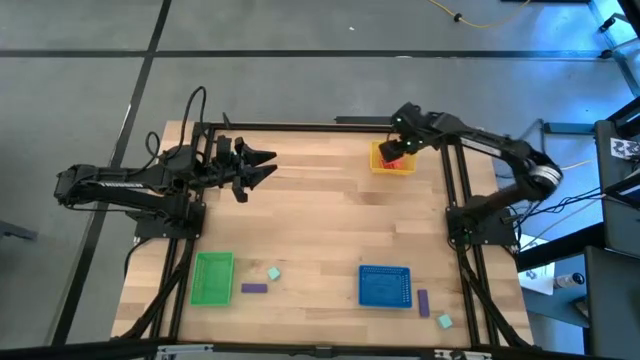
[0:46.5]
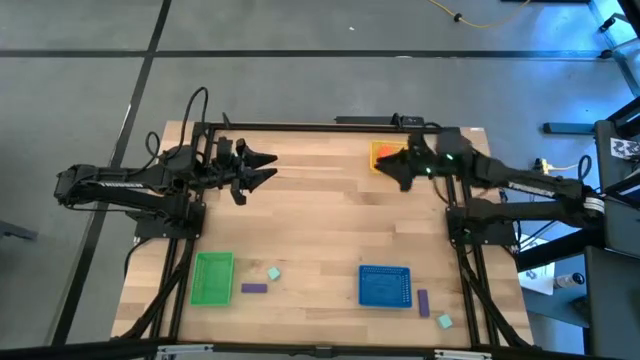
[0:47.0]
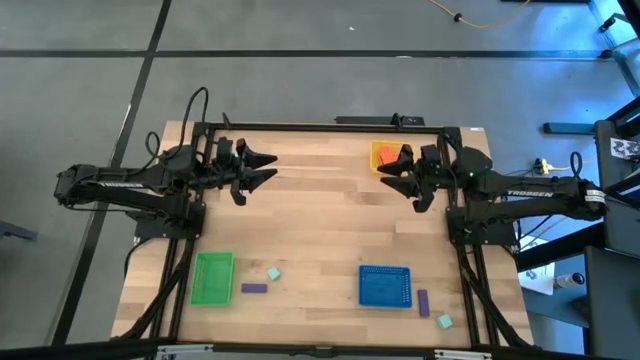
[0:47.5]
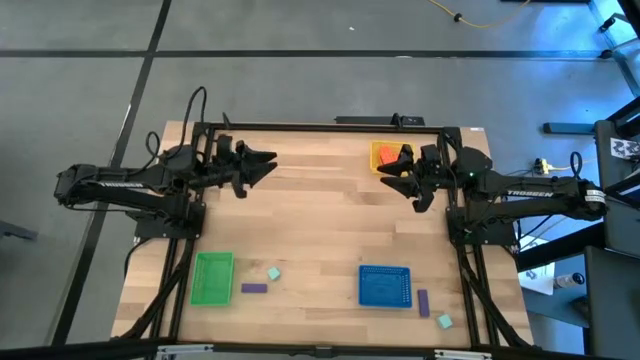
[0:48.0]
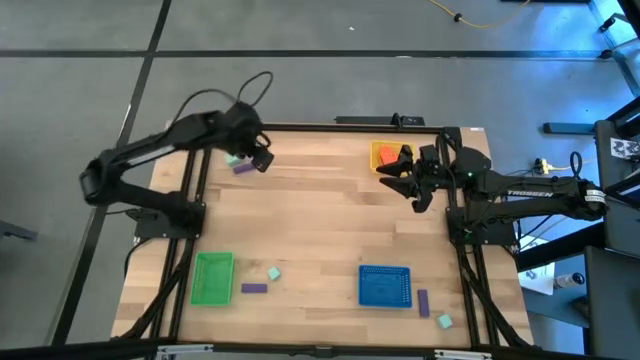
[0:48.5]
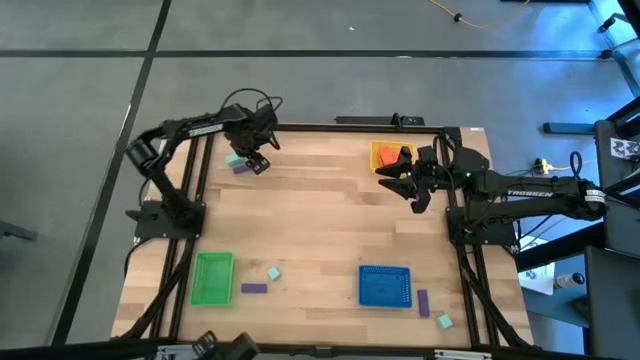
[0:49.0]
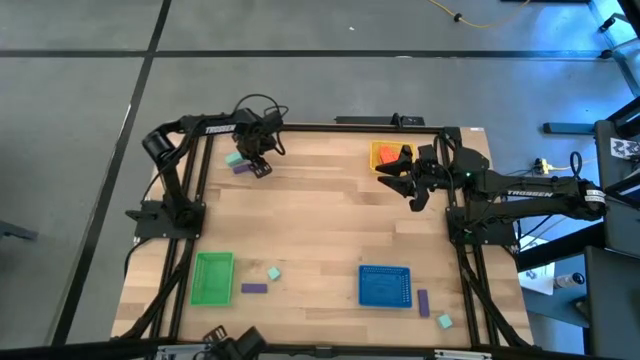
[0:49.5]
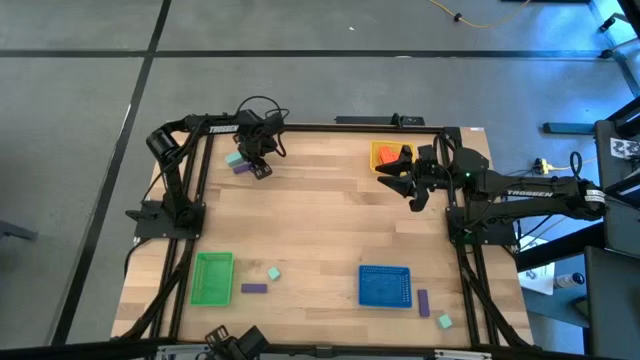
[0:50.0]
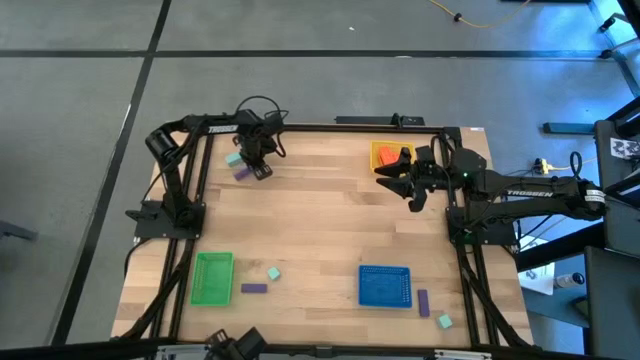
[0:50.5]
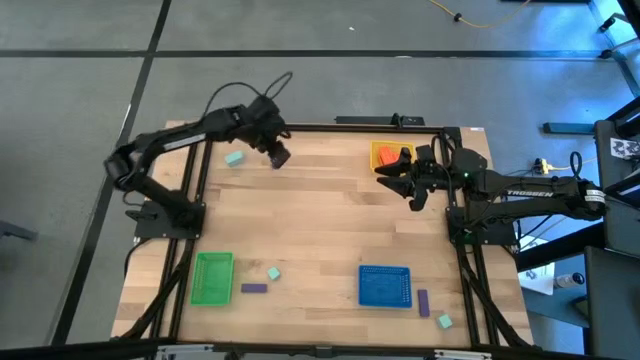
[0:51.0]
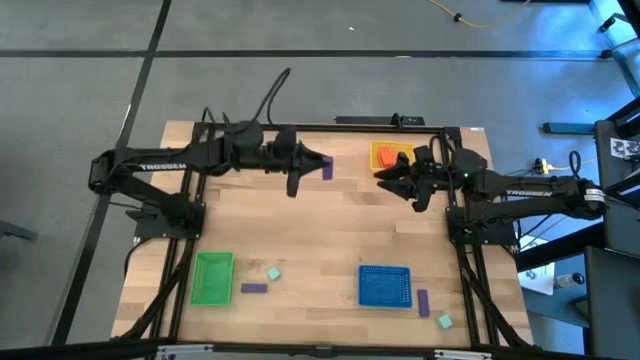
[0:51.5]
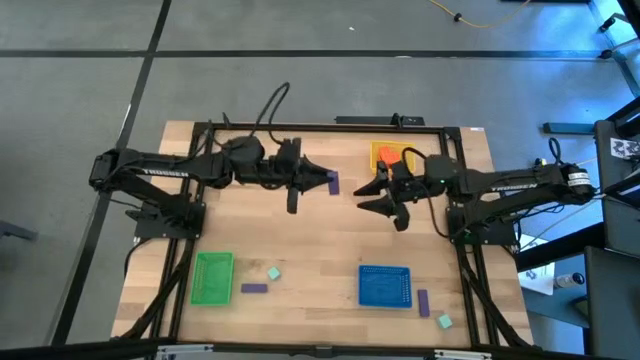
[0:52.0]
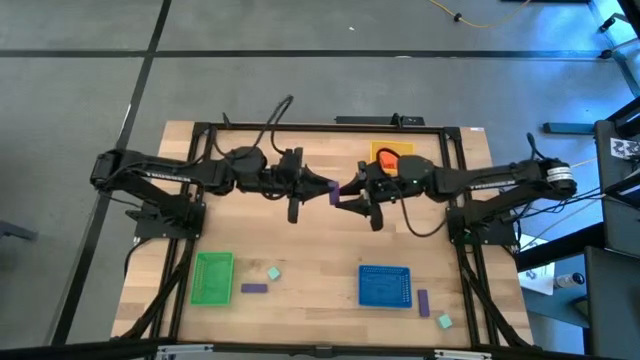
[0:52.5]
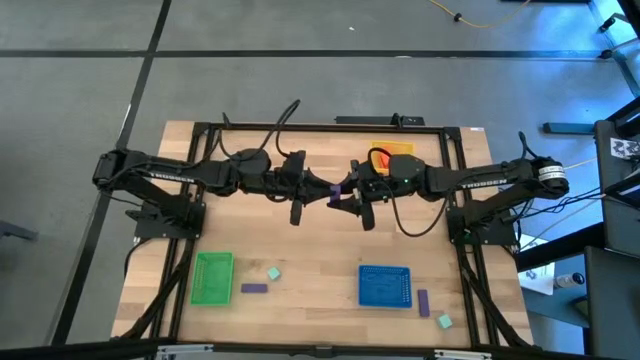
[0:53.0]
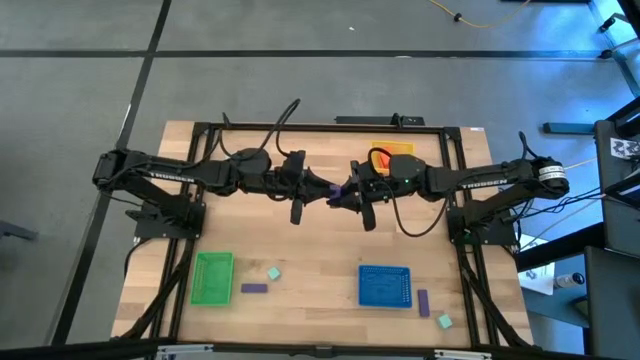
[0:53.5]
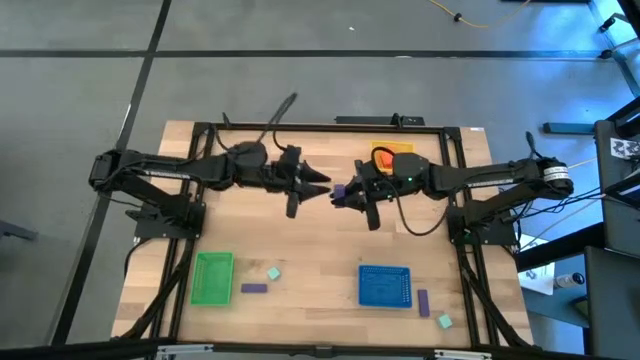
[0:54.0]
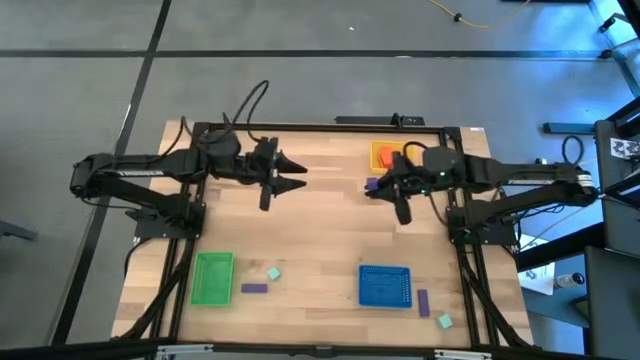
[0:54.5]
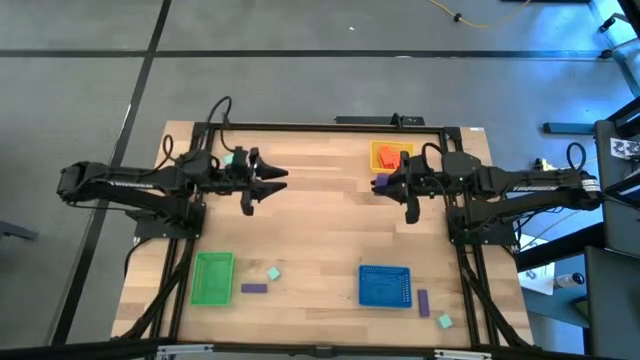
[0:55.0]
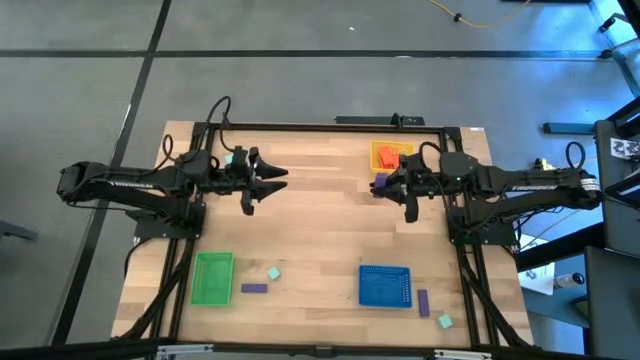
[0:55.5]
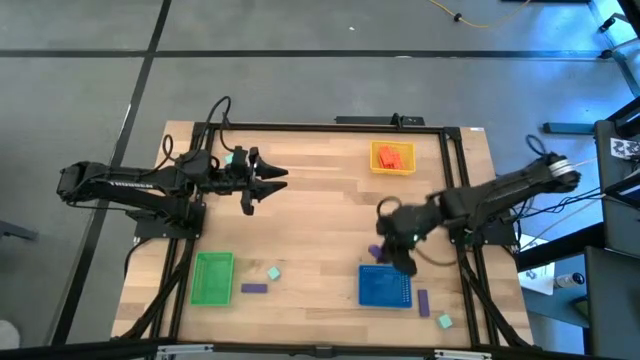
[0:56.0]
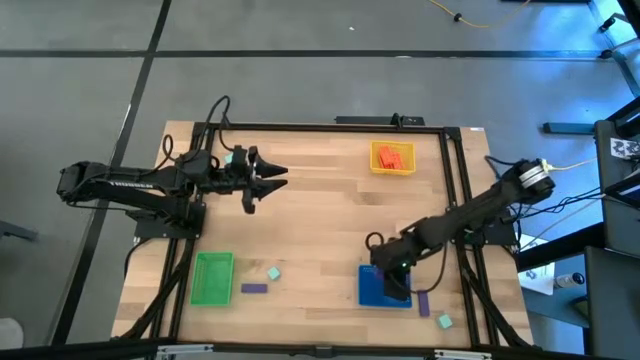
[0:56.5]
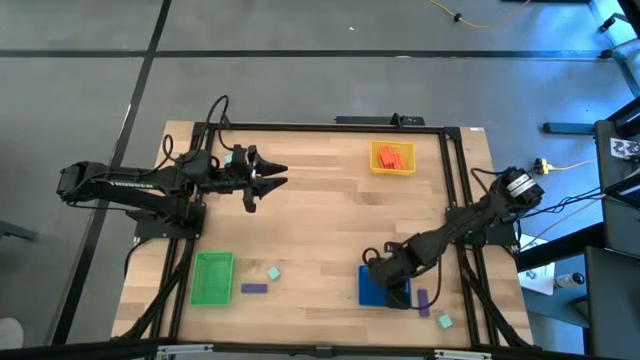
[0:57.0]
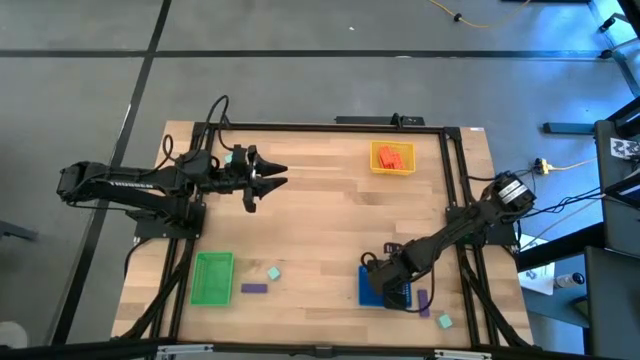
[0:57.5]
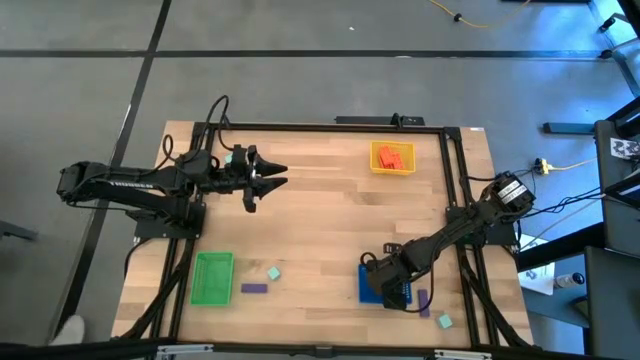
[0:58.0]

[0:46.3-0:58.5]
Task: Sort & place blocks by color
Put the top purple block into the blue bin

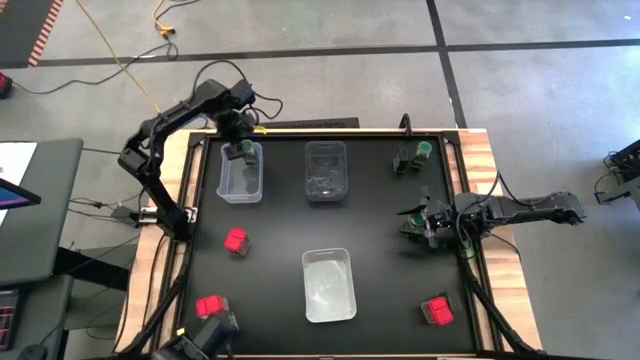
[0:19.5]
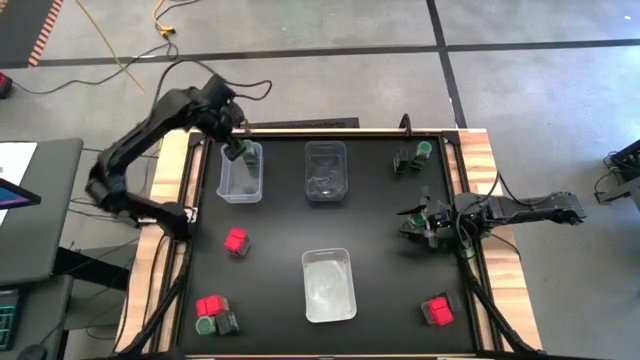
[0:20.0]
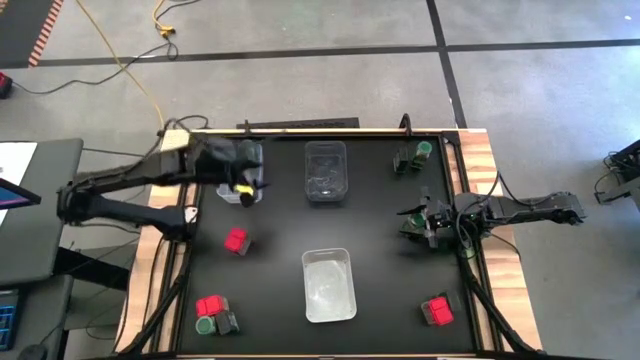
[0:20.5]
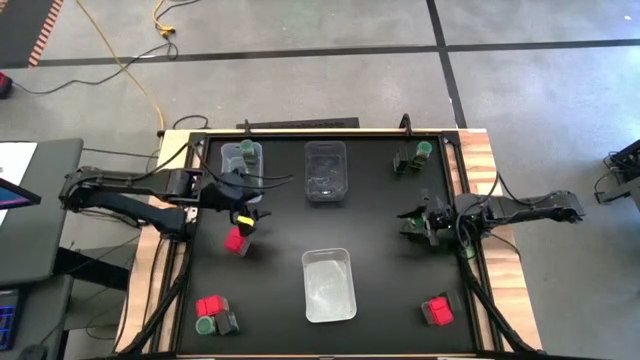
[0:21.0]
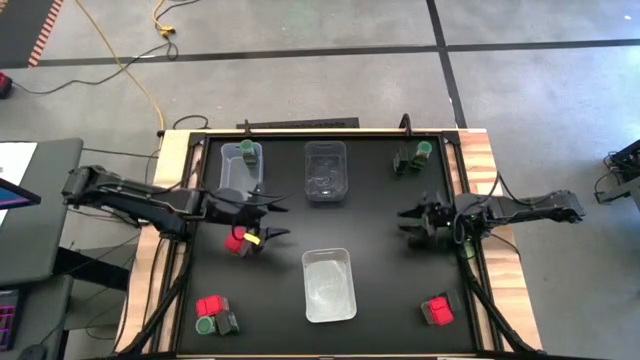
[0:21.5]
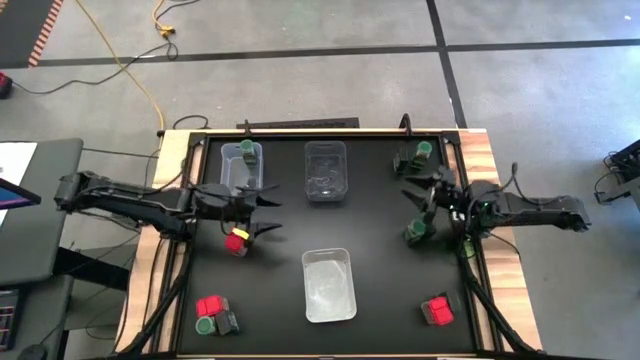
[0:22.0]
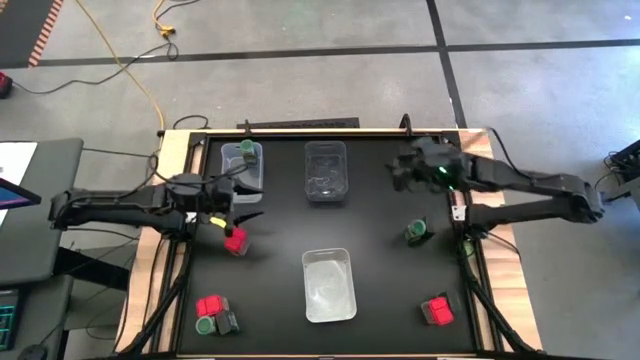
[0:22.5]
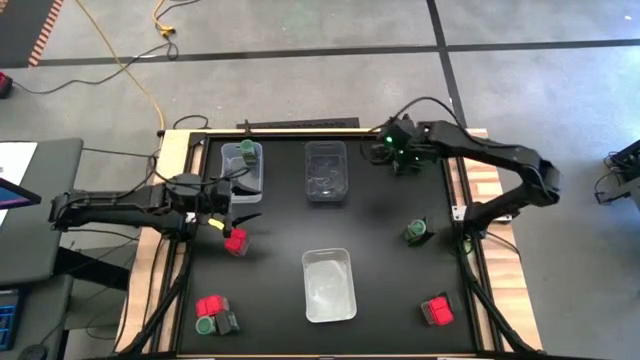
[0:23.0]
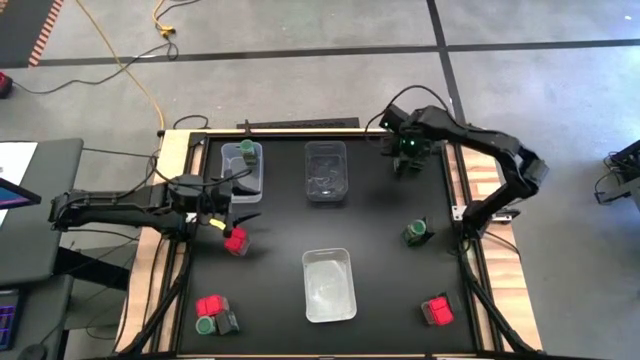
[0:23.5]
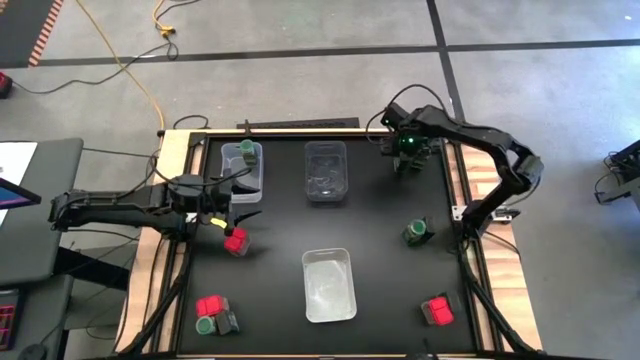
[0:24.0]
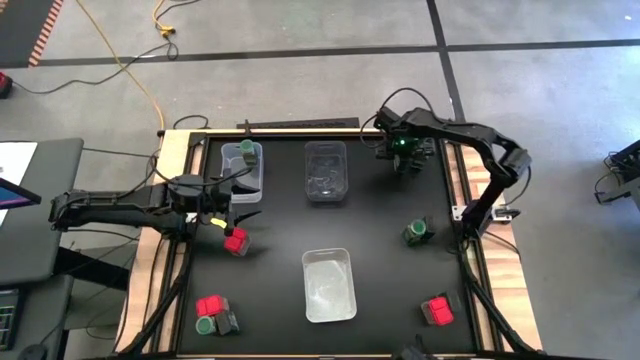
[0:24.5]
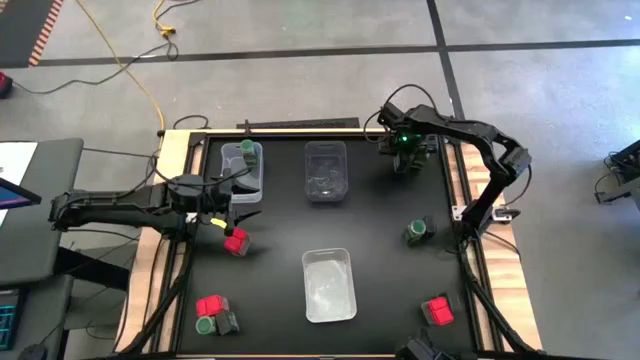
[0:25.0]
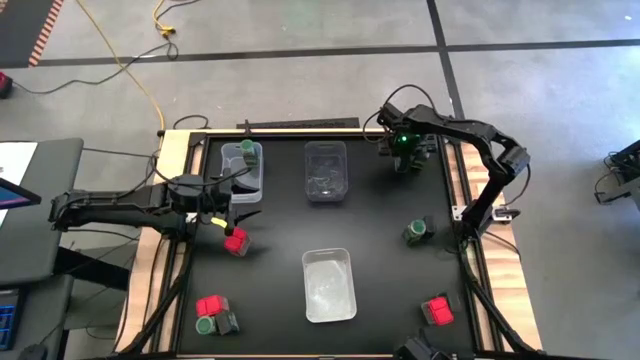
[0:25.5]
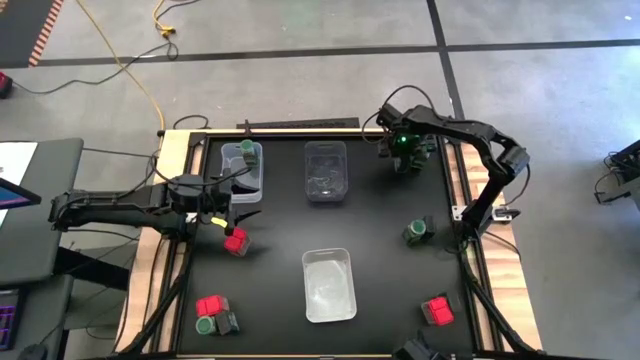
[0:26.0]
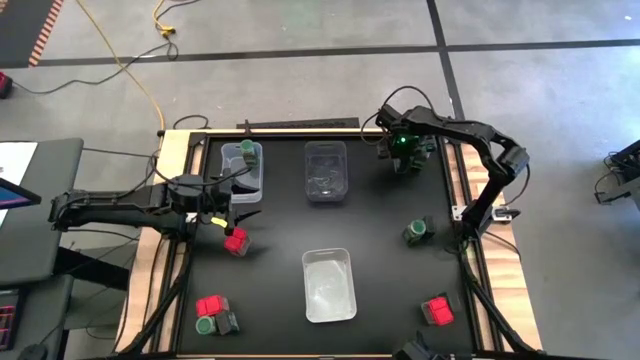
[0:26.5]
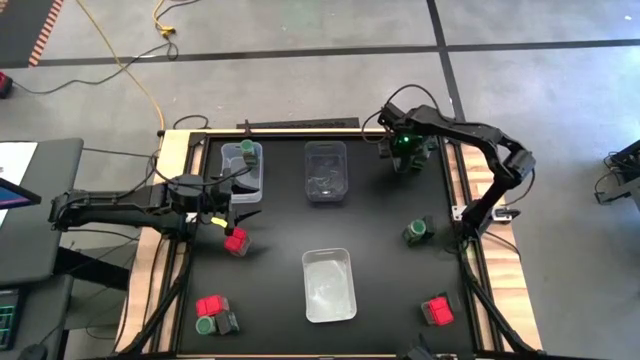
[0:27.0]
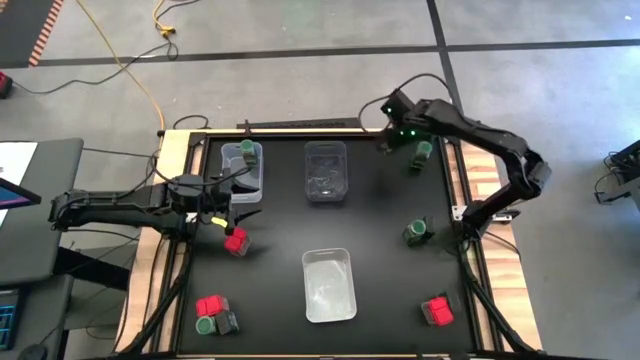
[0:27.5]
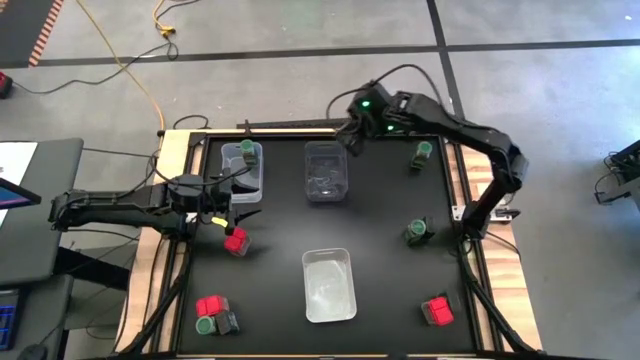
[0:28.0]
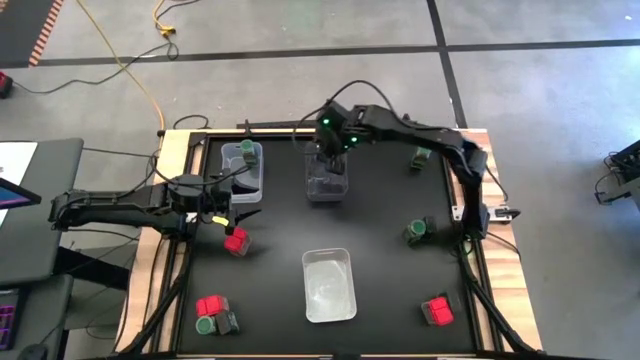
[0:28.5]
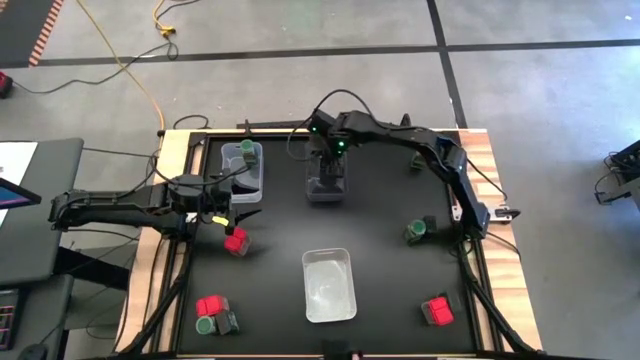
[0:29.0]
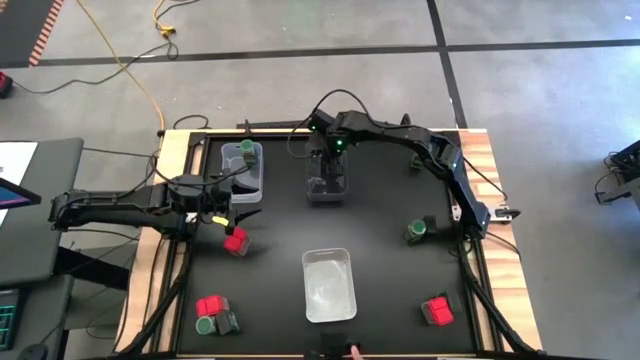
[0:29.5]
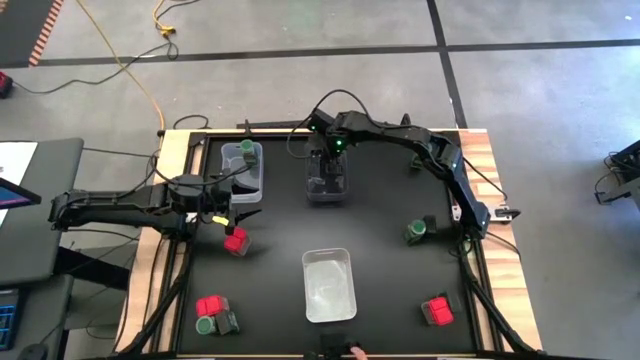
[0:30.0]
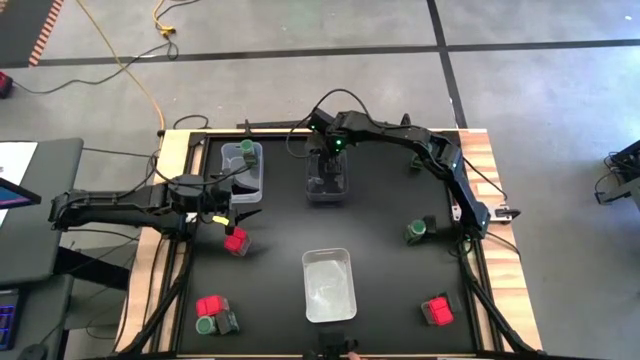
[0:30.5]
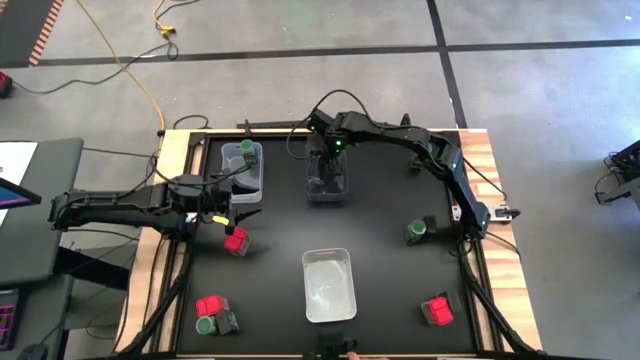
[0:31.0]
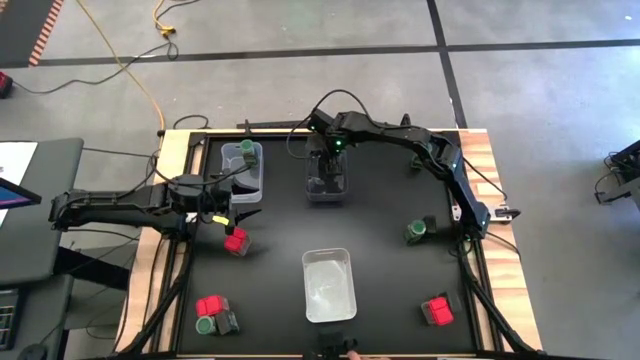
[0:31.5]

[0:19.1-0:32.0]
Task: Sort spices by type
Put the top right black seasoning can into the black bin
